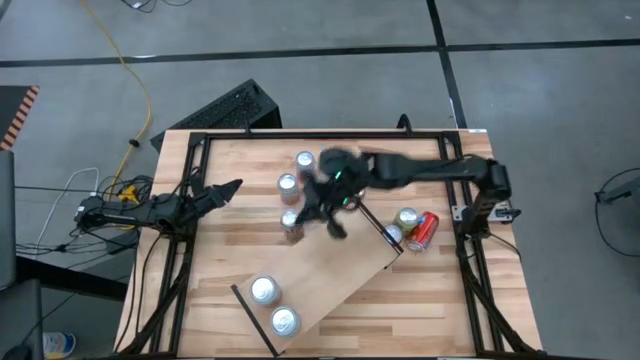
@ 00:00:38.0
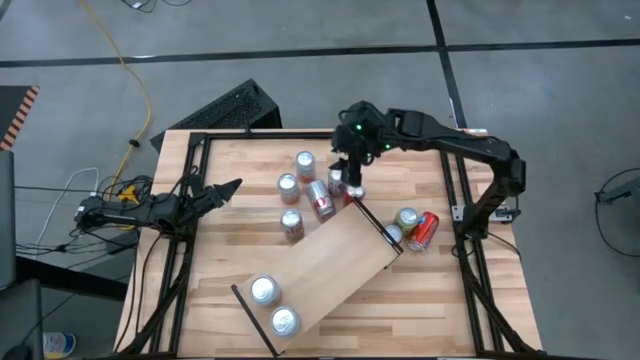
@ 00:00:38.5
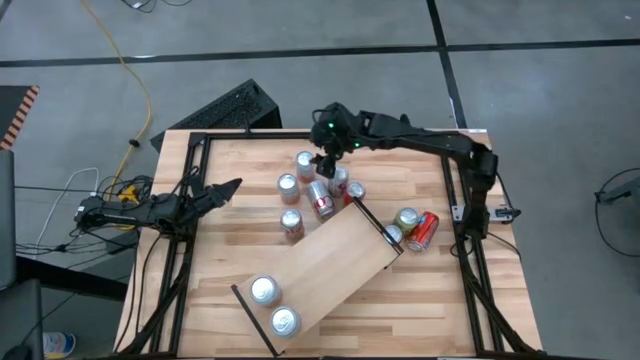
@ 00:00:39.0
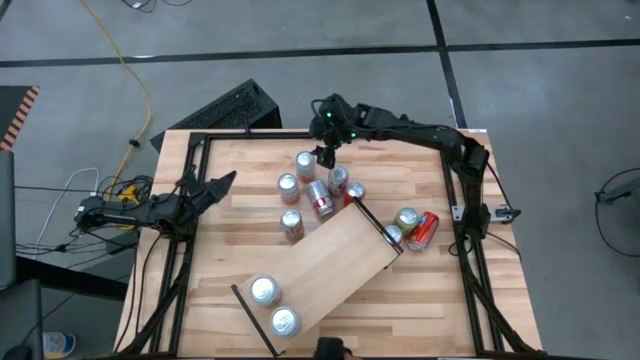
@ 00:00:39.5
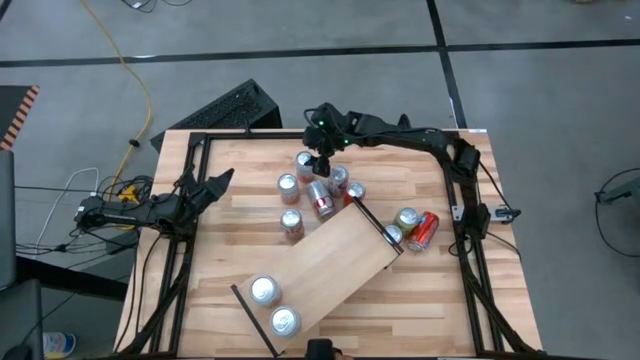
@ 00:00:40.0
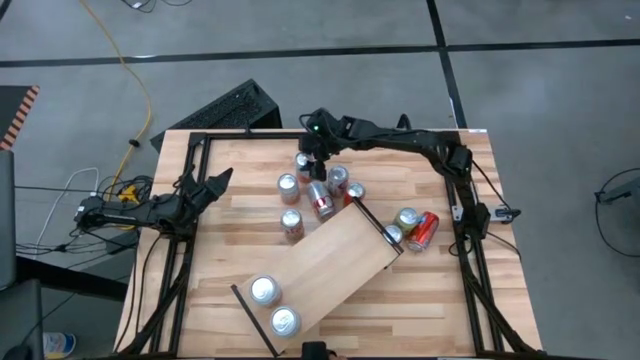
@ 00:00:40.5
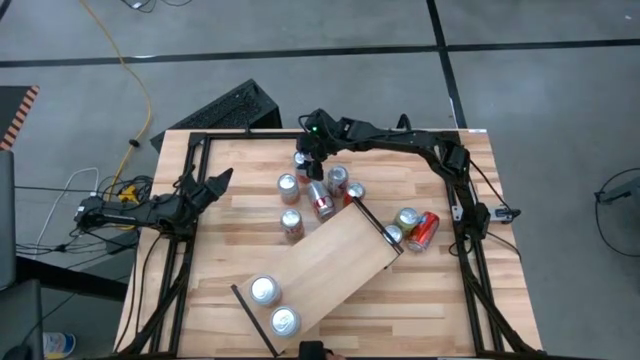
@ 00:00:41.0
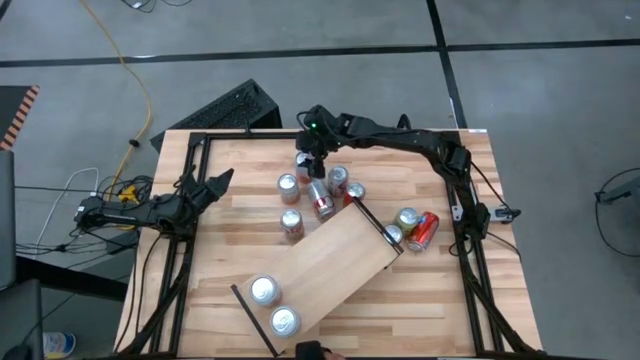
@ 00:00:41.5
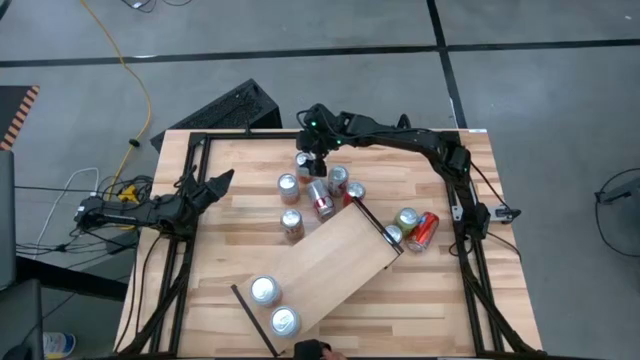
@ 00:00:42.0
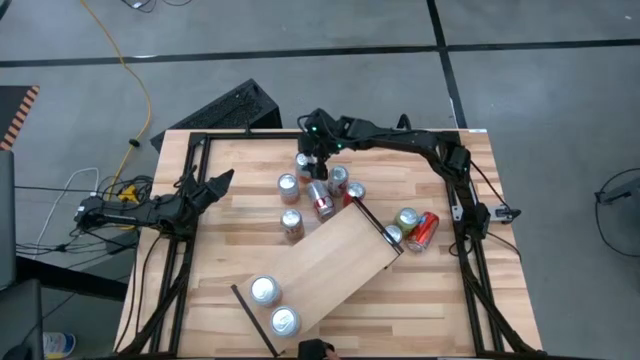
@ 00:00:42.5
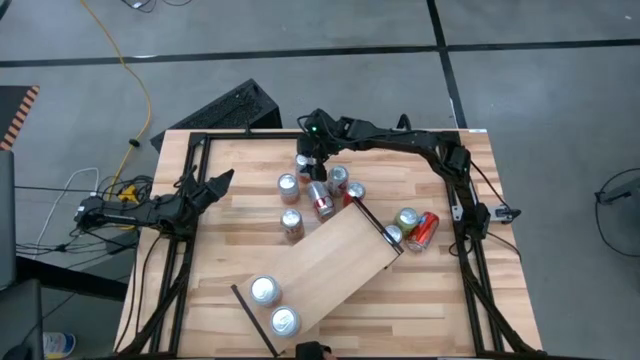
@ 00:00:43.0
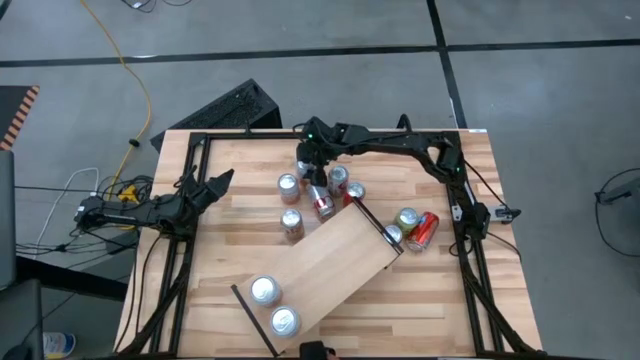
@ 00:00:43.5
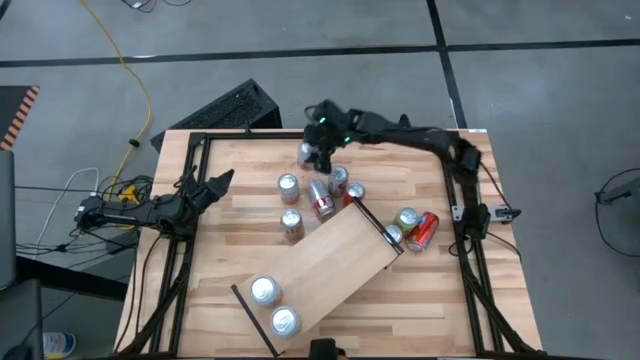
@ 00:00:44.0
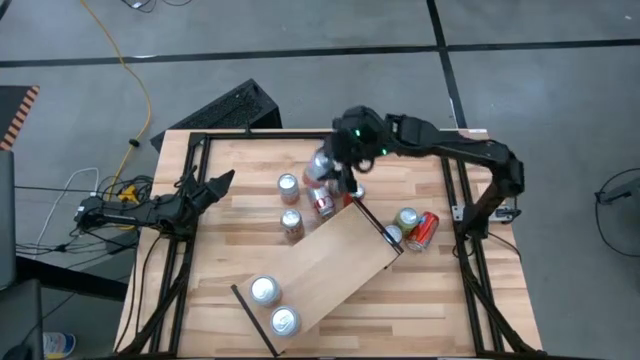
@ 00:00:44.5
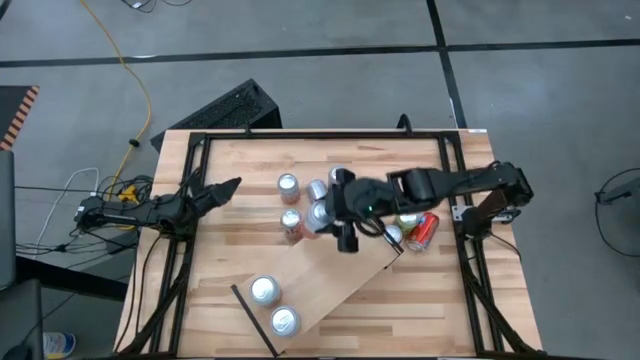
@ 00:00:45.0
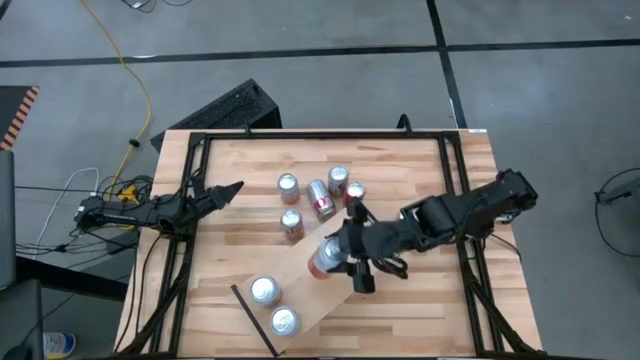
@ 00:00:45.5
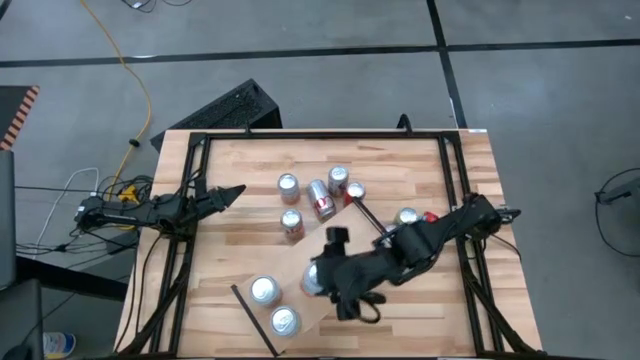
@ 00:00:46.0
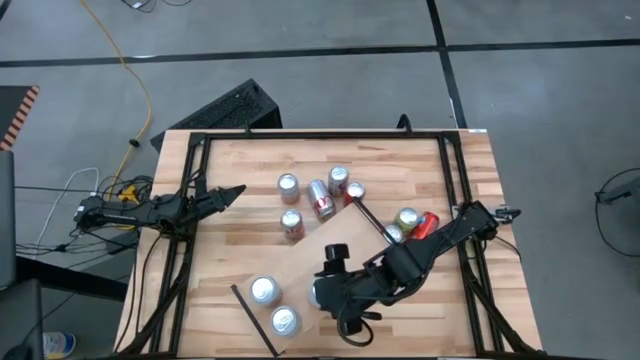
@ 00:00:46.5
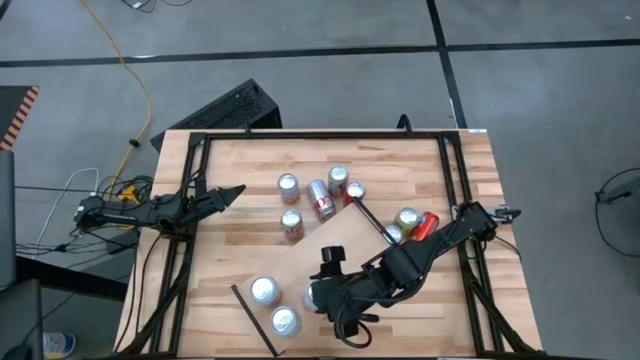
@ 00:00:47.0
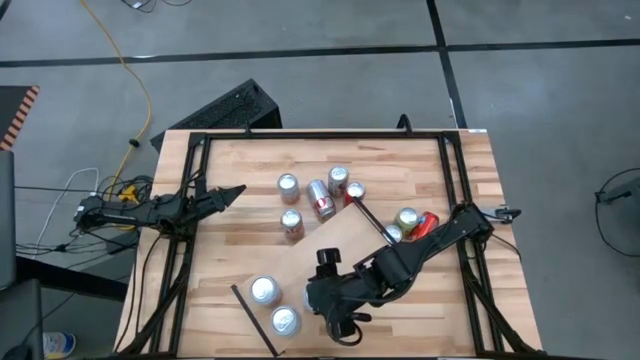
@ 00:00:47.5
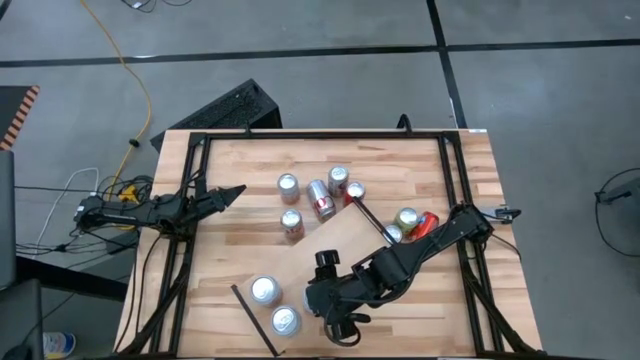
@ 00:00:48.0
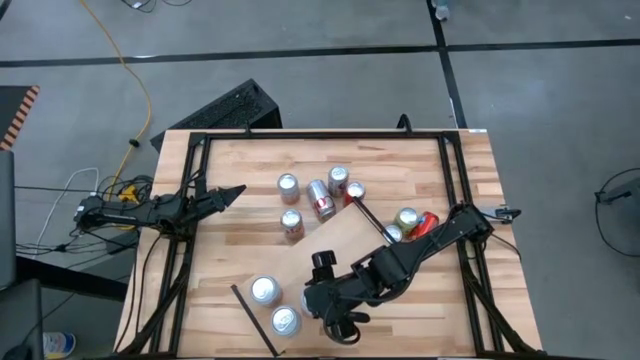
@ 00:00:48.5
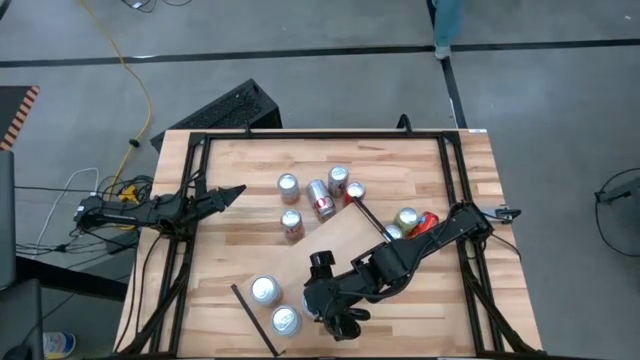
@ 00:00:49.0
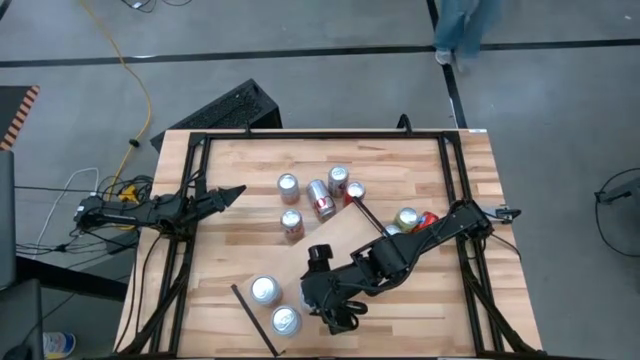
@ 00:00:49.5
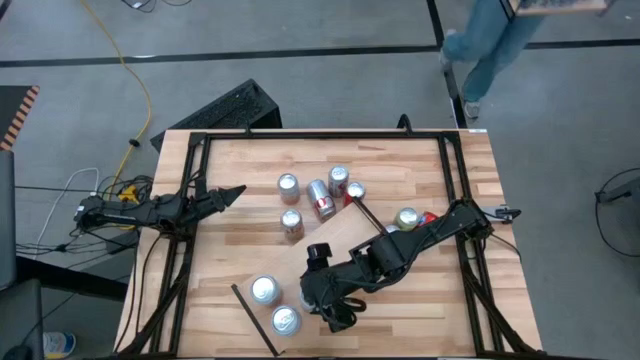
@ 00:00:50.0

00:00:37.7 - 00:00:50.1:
Task: Place canned beverage on shelf
Put the orange white soda can on the shelf

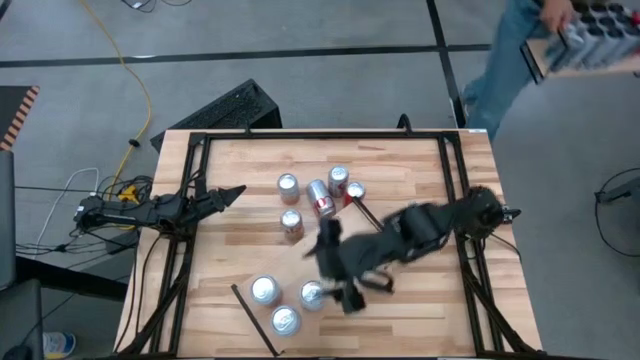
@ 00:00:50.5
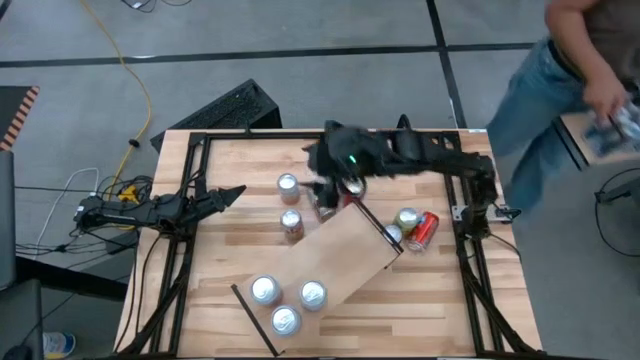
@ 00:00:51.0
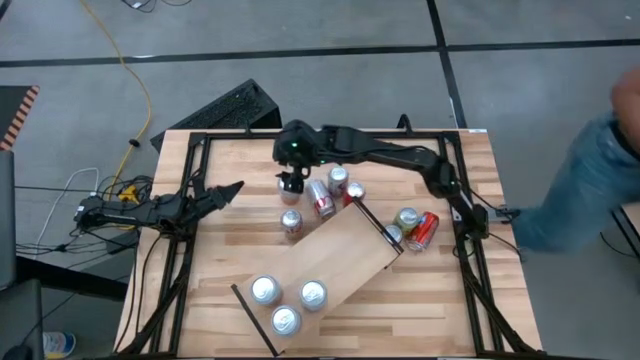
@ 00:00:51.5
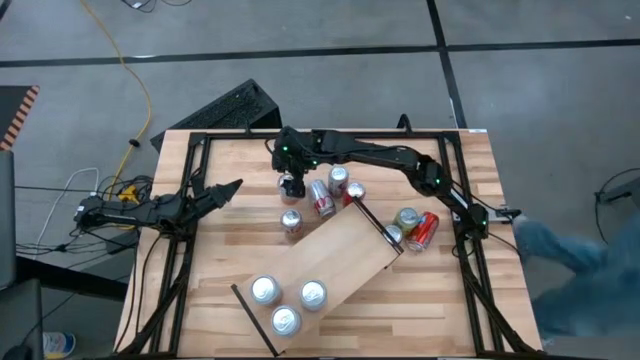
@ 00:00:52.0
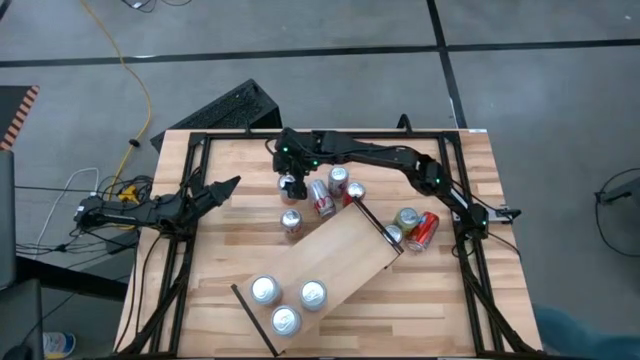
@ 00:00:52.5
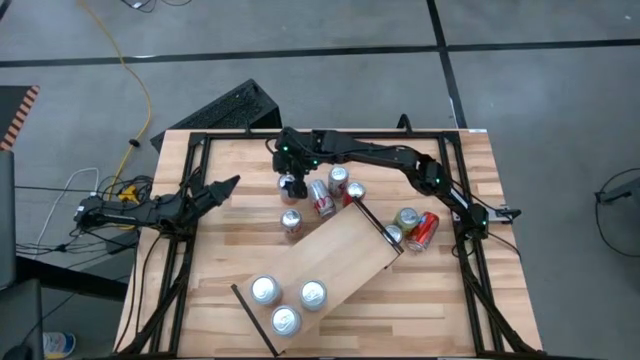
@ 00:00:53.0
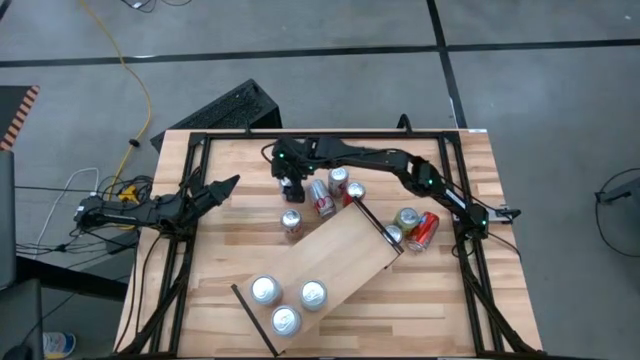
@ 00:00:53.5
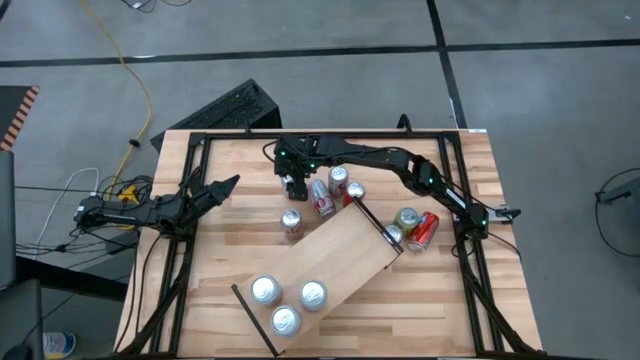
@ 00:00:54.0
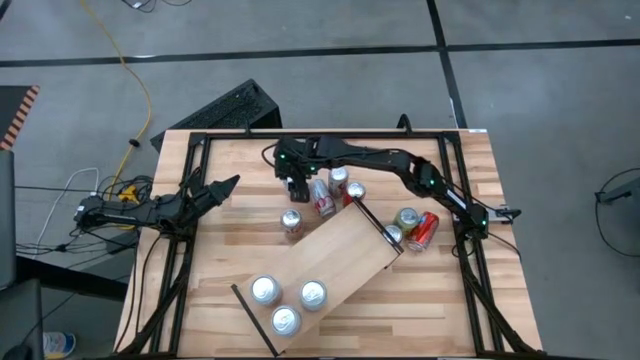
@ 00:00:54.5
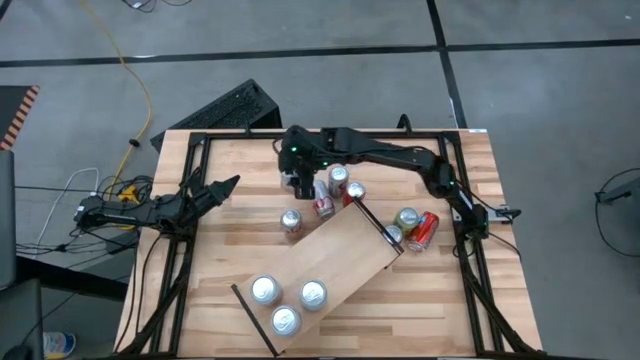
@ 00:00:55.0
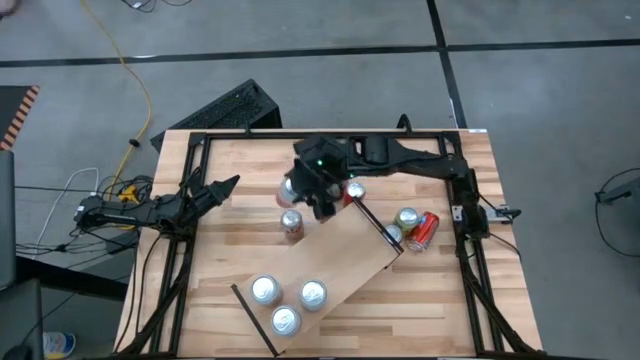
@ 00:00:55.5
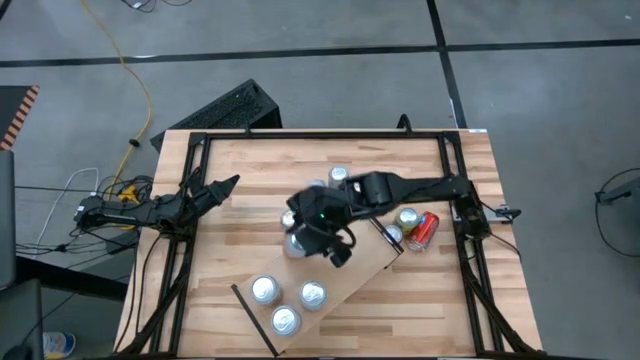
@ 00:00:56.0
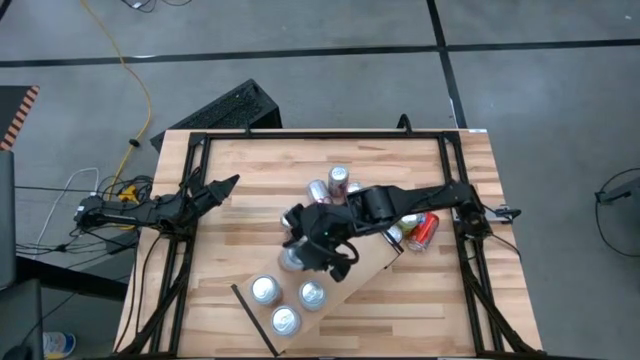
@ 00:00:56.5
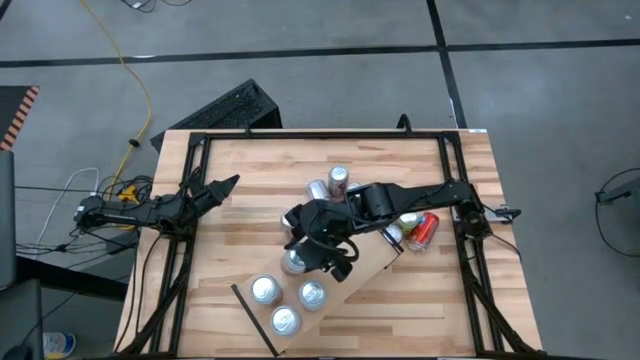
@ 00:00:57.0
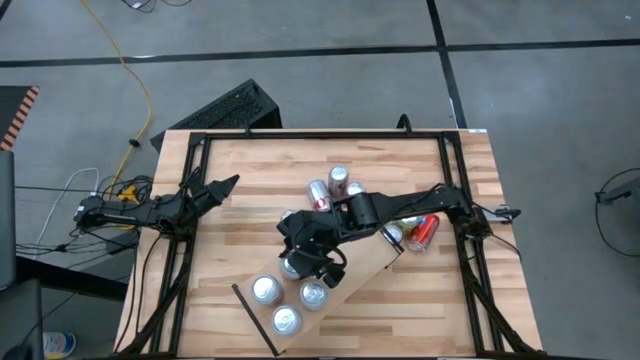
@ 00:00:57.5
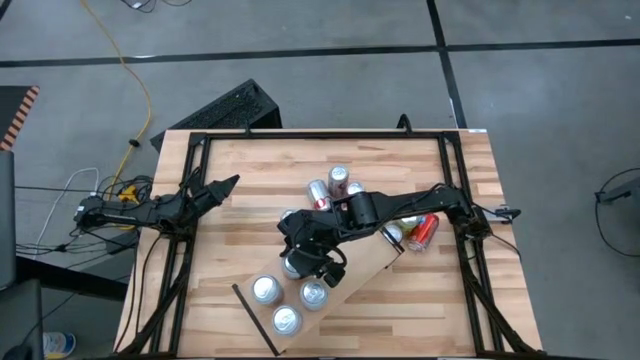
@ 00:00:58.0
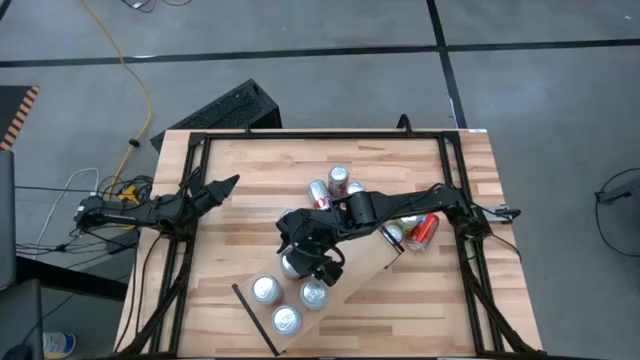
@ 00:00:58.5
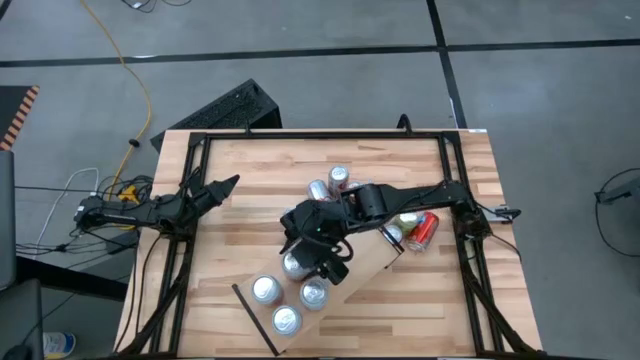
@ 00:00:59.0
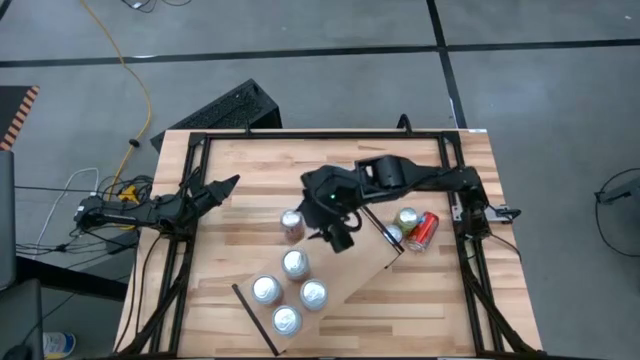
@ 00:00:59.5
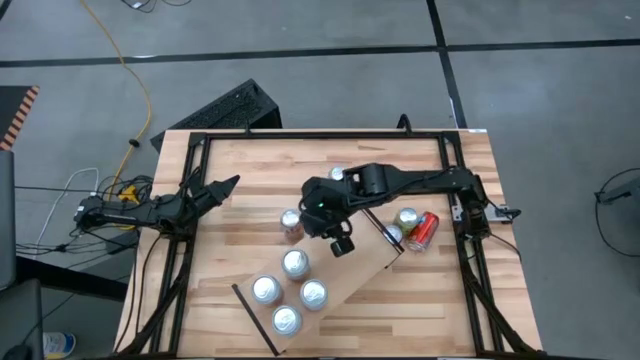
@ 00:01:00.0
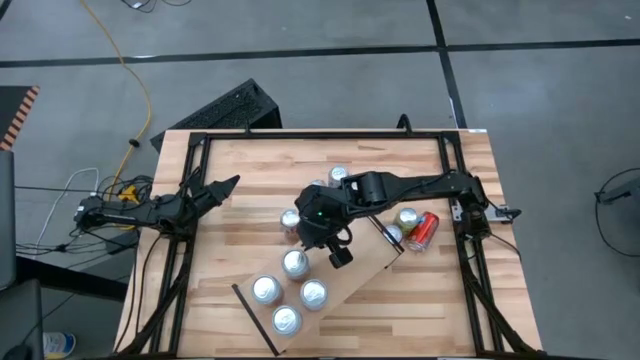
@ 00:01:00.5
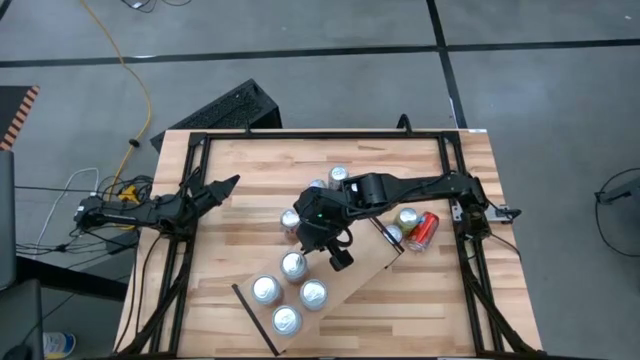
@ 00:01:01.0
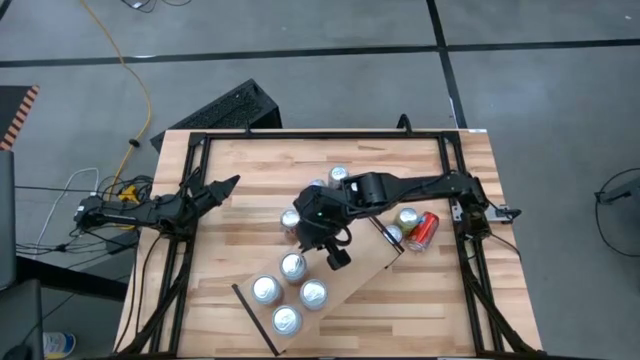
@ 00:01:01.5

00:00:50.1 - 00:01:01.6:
Put the orange white soda can on the shelf aligned with the other orange white soda can
